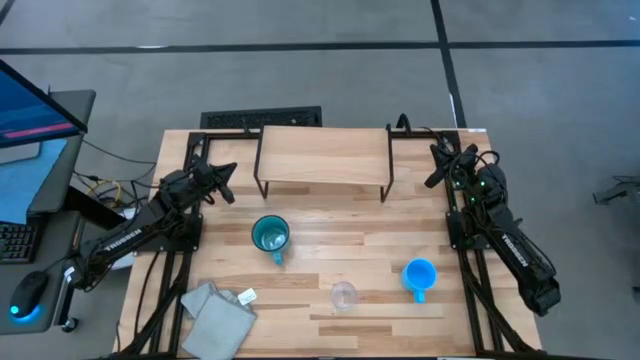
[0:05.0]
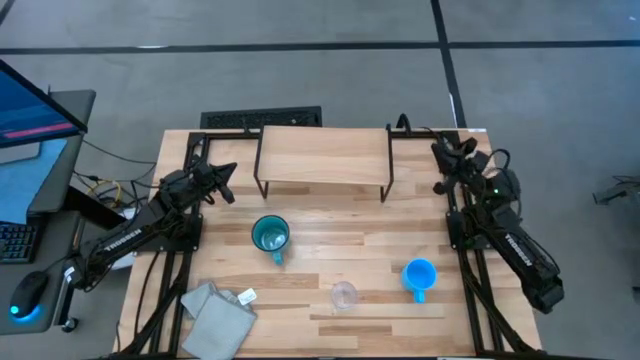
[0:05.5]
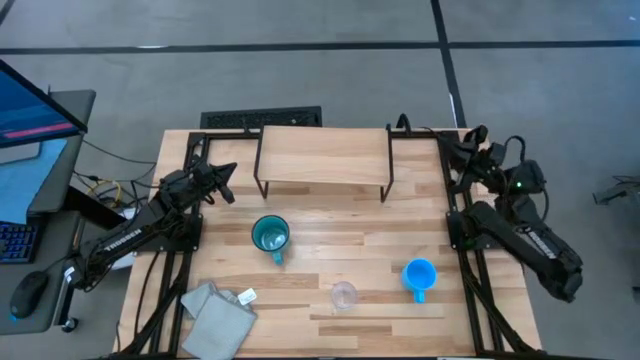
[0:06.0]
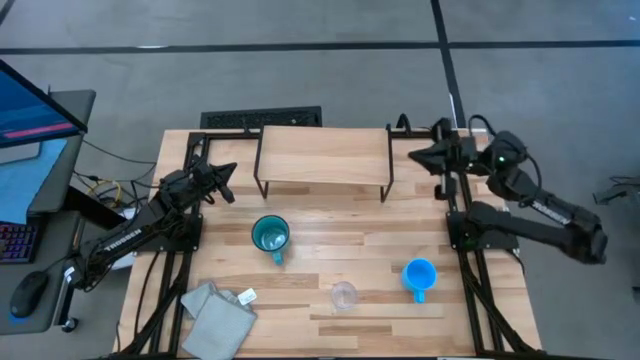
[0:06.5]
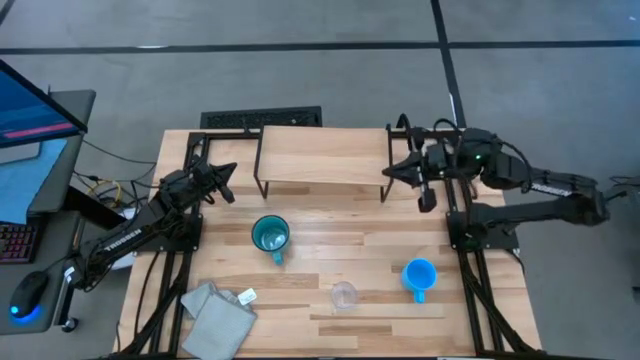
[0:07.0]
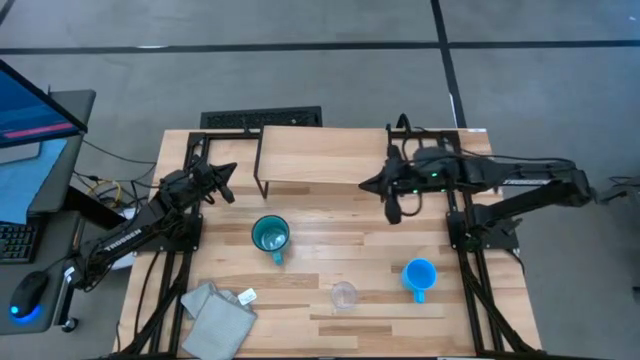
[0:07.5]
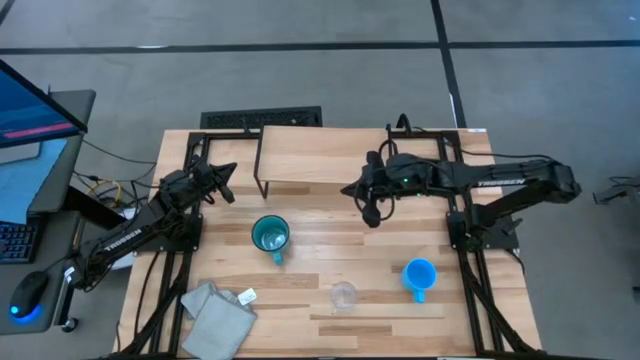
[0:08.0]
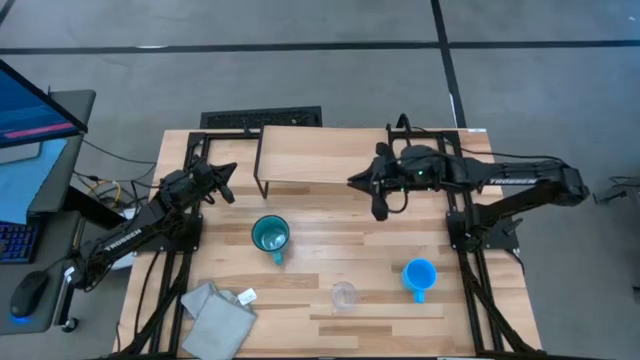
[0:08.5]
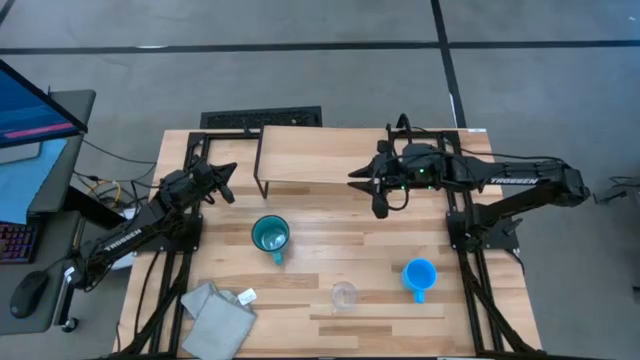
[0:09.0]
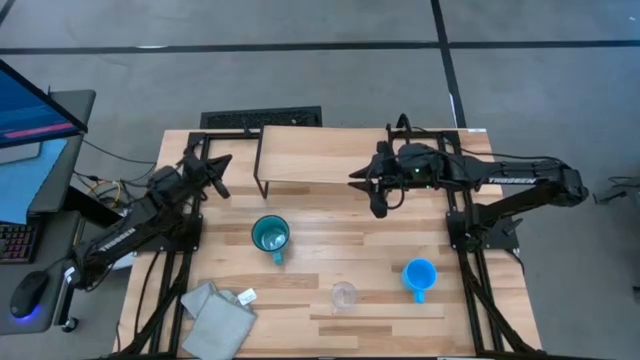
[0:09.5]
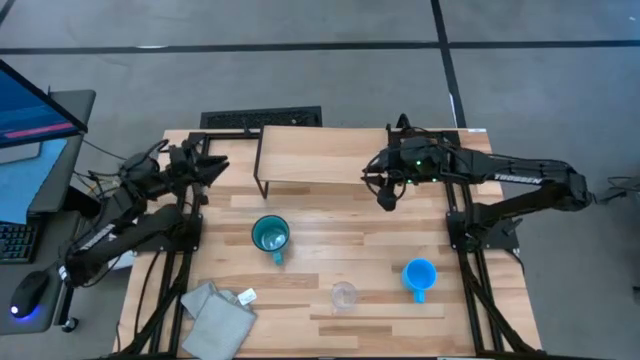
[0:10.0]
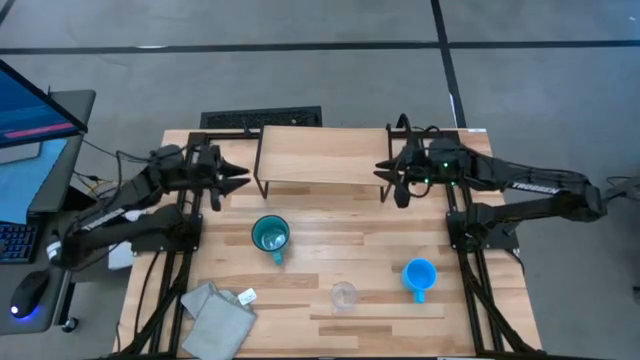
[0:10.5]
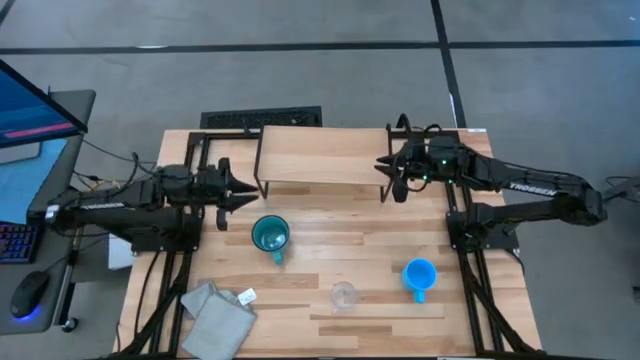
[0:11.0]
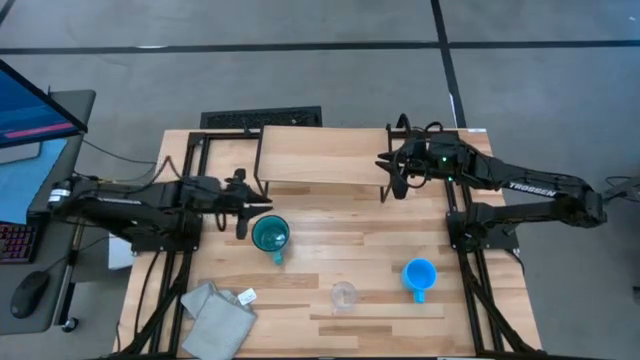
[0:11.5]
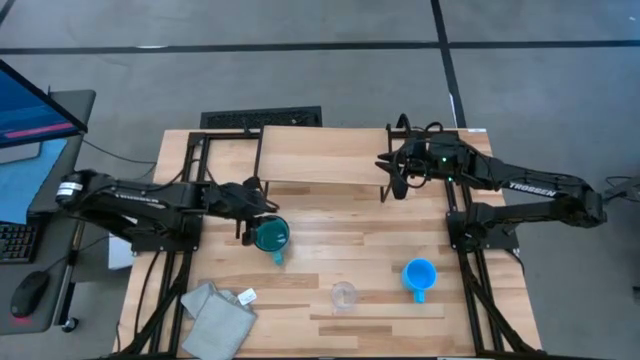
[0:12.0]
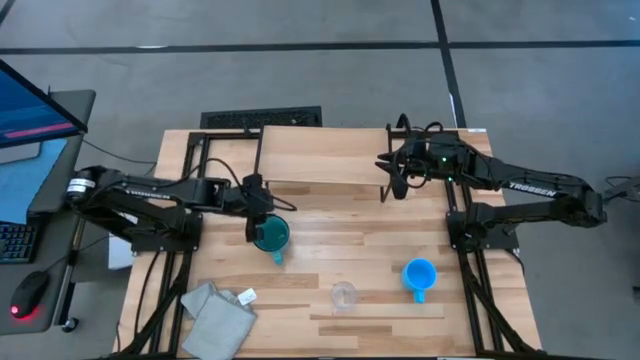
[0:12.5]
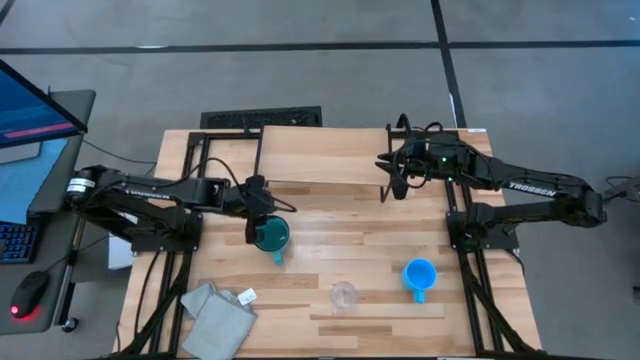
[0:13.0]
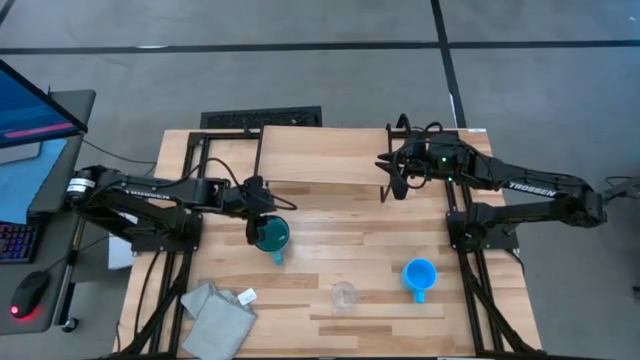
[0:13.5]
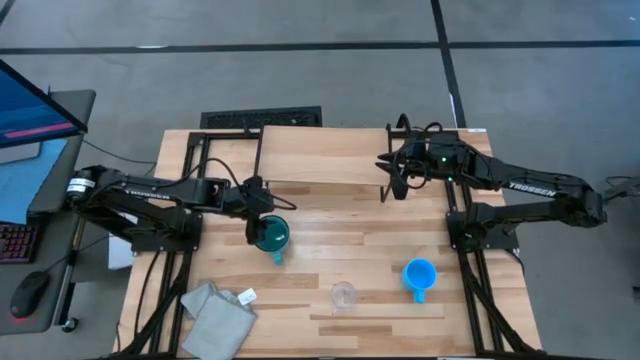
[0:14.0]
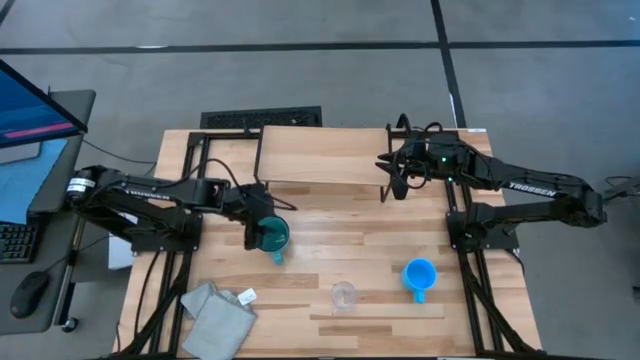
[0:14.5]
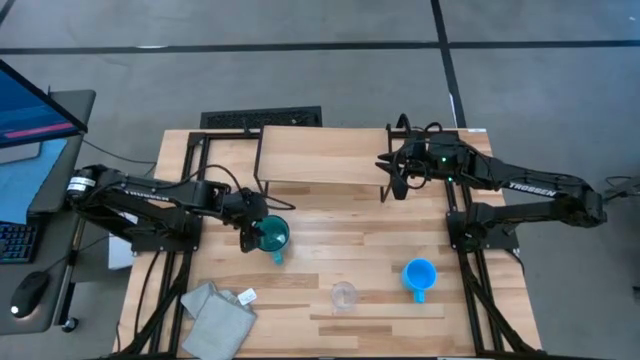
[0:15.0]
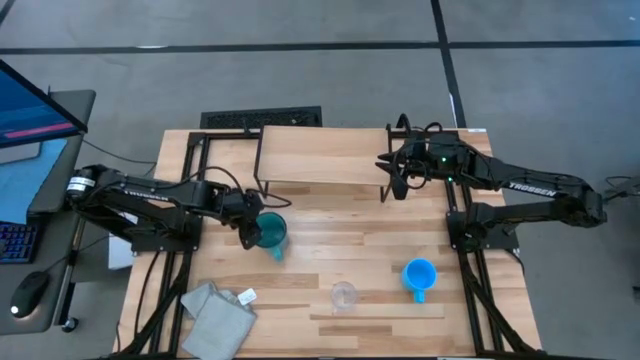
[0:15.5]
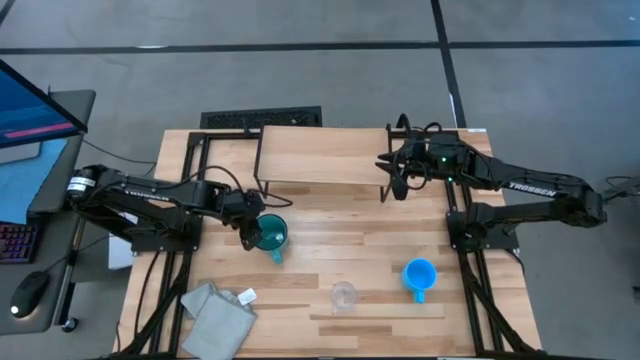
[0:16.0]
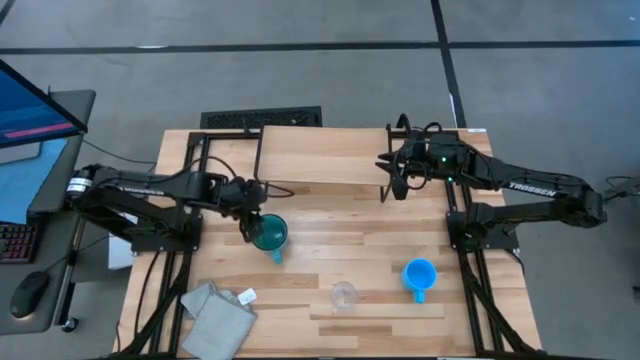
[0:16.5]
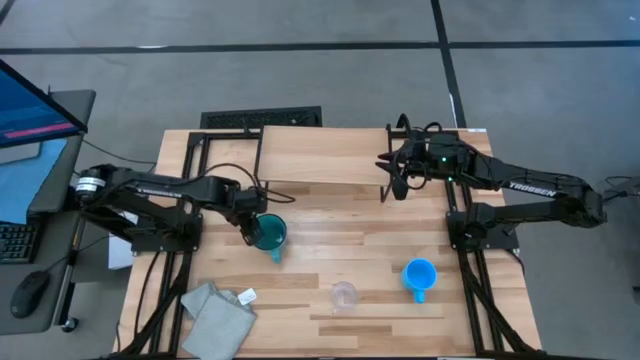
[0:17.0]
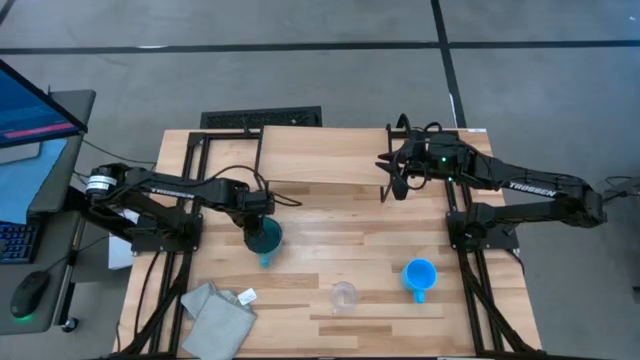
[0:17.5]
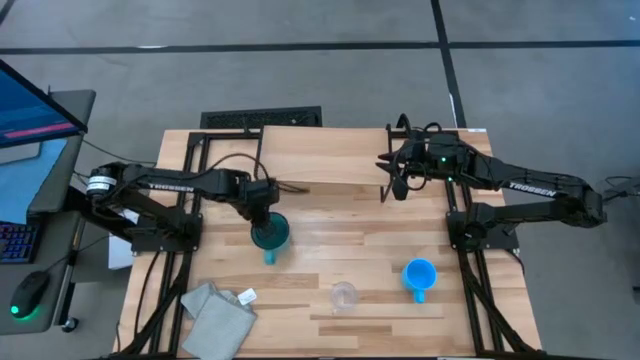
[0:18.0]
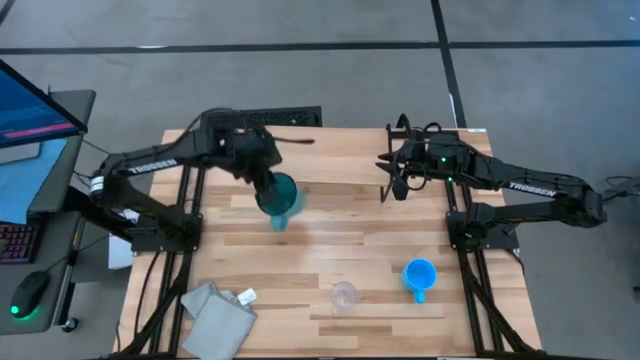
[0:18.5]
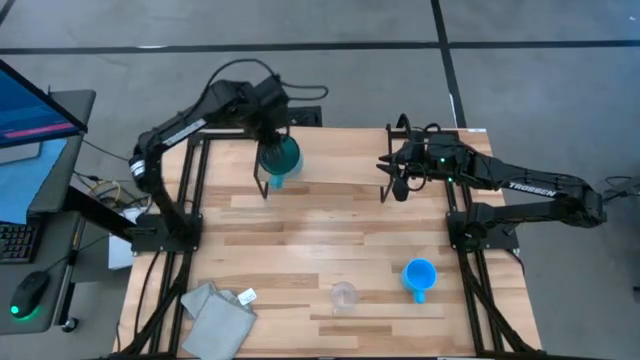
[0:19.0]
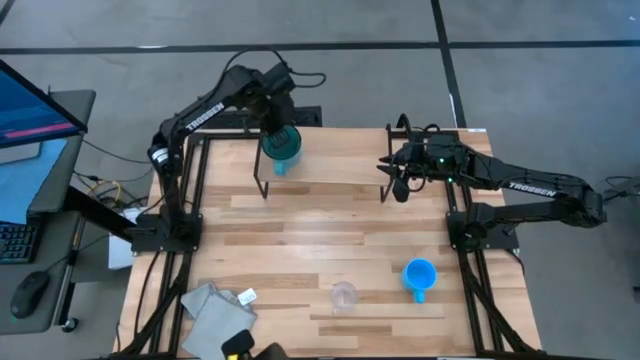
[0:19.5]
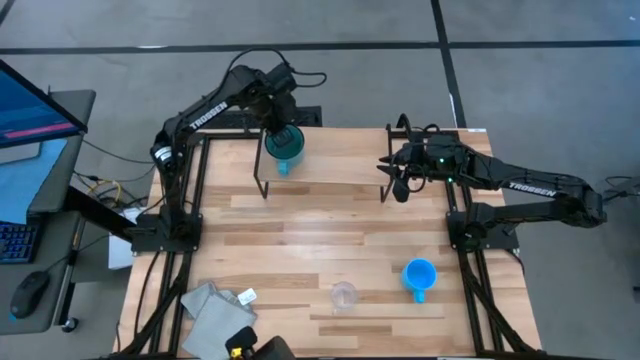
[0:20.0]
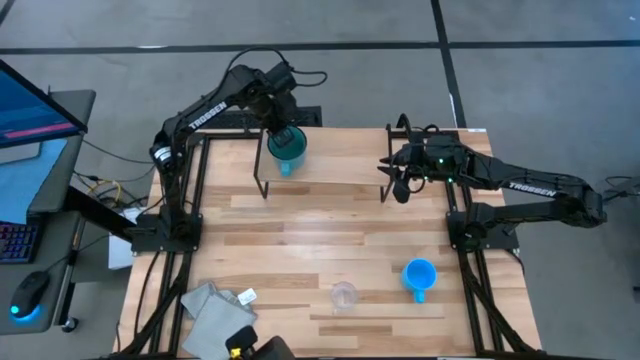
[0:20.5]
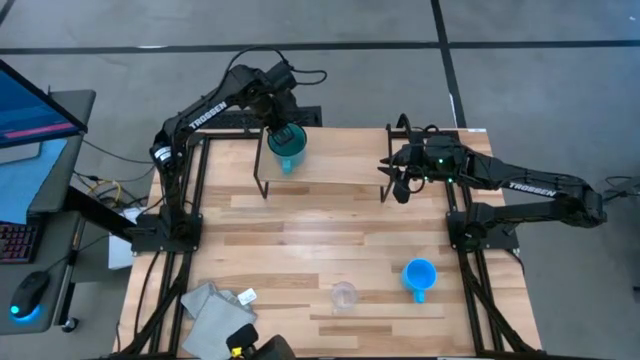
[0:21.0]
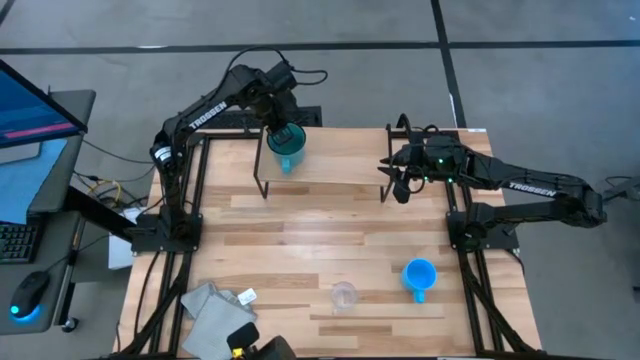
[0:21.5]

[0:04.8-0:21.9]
Task: Stack small to large cups/mugs on shelf
Put the dark blue mug on the shelf

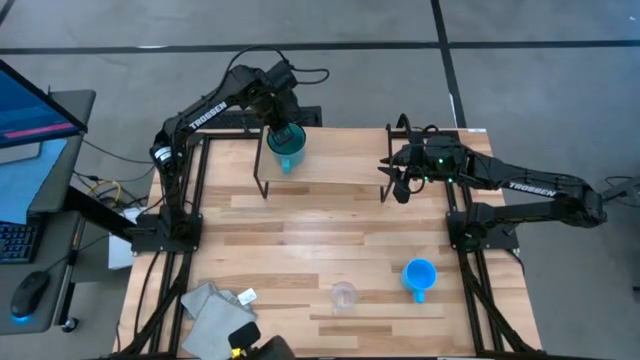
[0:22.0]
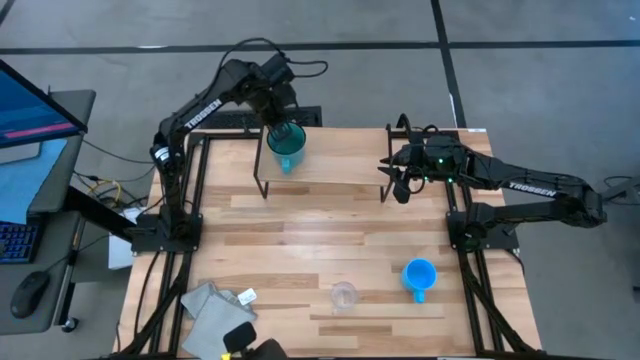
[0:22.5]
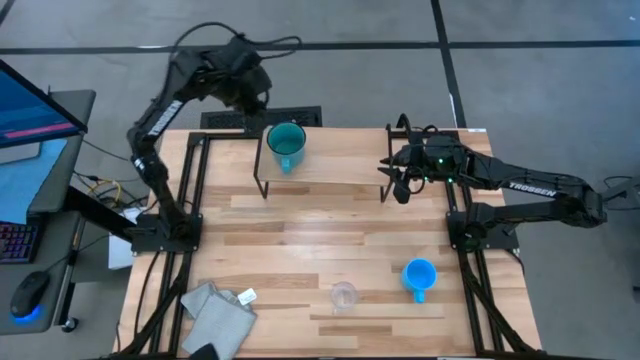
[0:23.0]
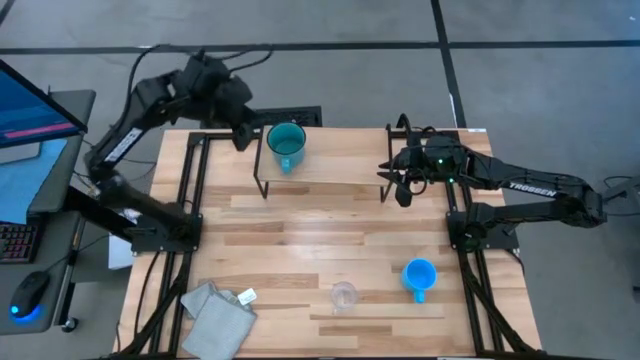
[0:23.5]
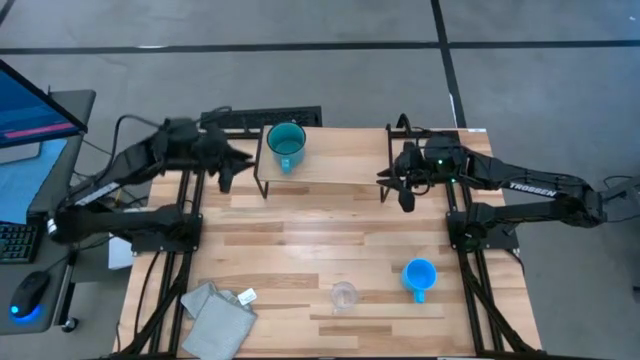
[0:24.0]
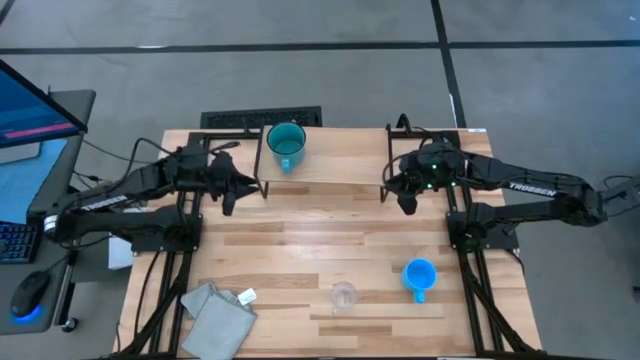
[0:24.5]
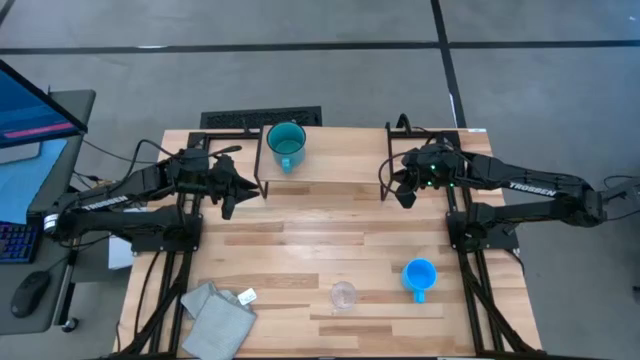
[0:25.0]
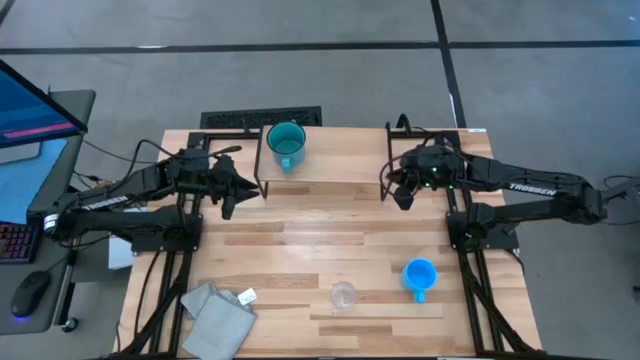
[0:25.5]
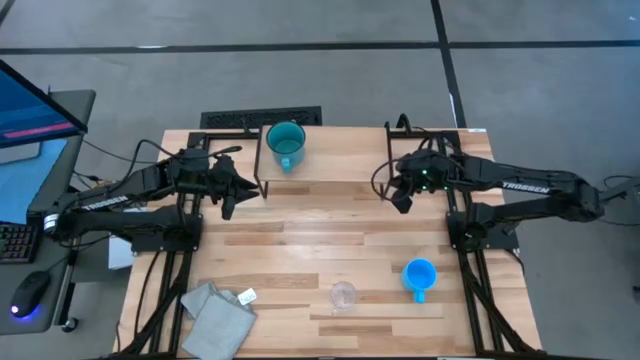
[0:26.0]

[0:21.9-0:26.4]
Adjust the shelf
